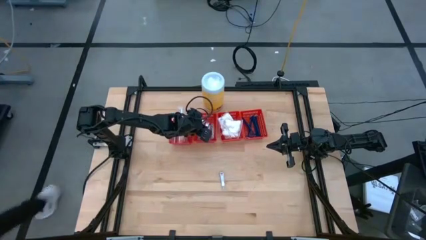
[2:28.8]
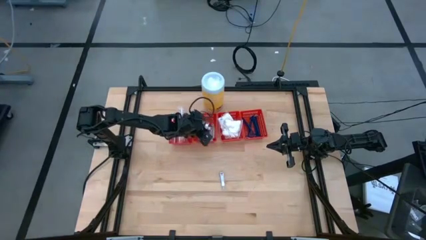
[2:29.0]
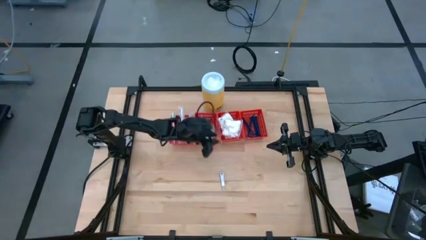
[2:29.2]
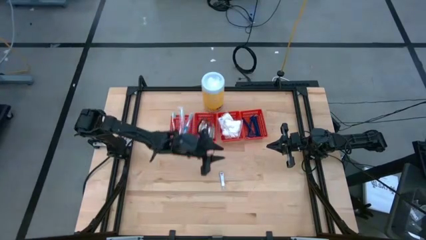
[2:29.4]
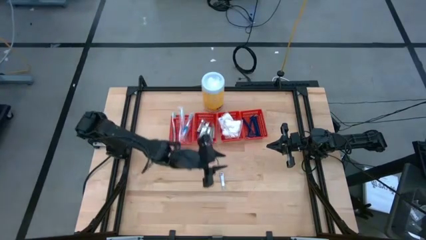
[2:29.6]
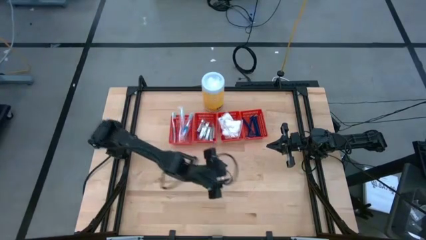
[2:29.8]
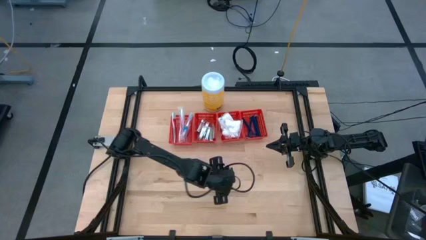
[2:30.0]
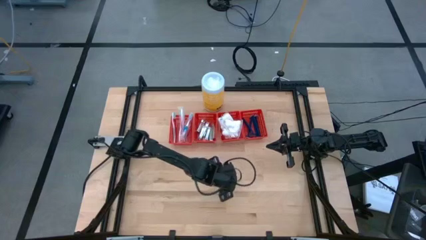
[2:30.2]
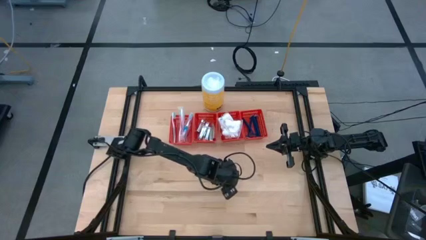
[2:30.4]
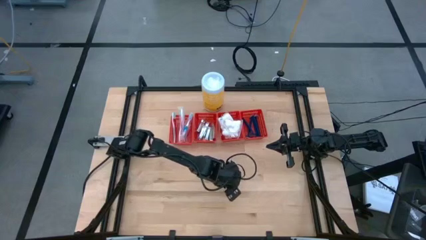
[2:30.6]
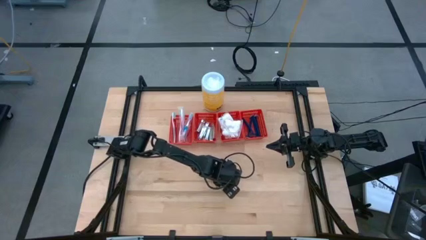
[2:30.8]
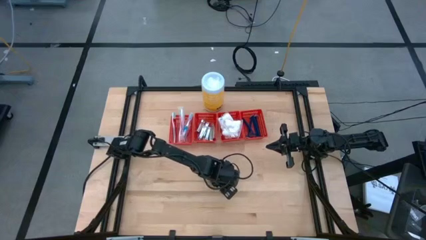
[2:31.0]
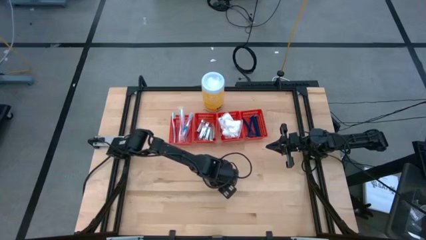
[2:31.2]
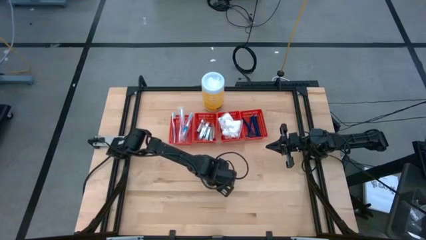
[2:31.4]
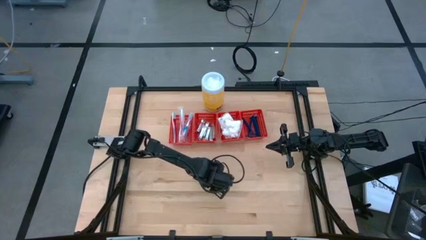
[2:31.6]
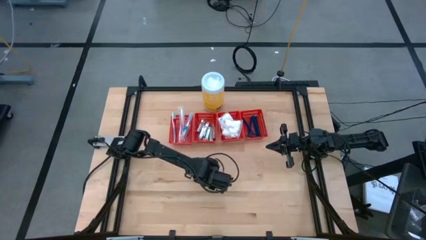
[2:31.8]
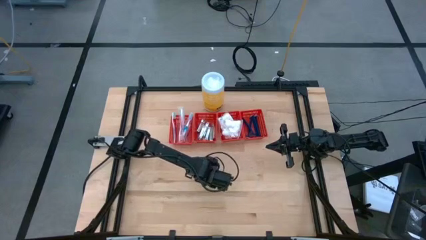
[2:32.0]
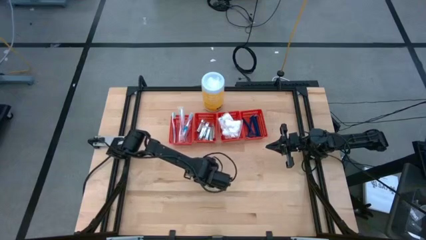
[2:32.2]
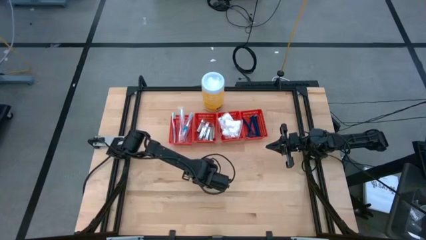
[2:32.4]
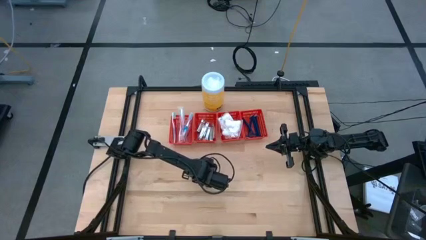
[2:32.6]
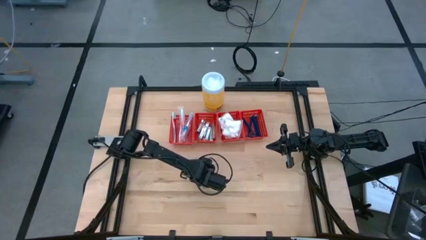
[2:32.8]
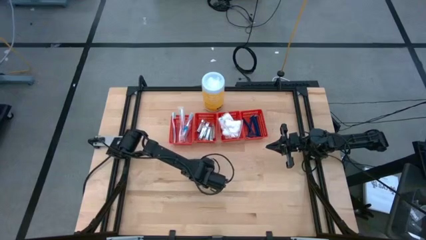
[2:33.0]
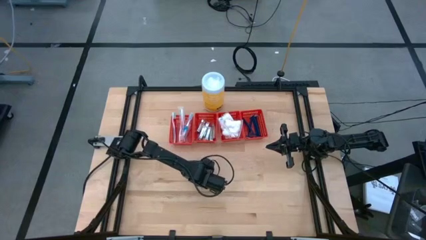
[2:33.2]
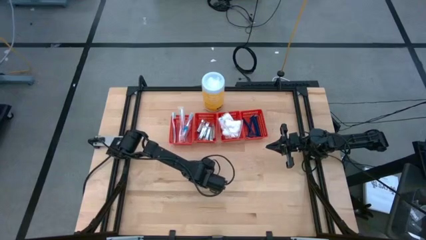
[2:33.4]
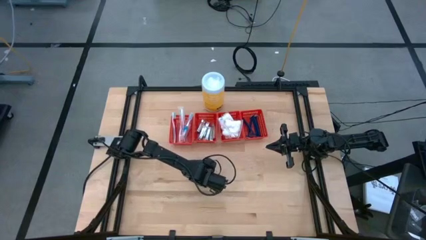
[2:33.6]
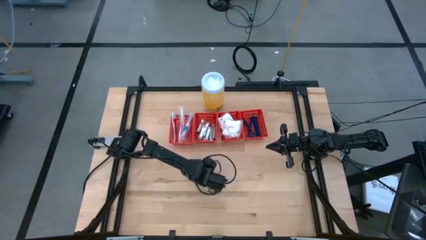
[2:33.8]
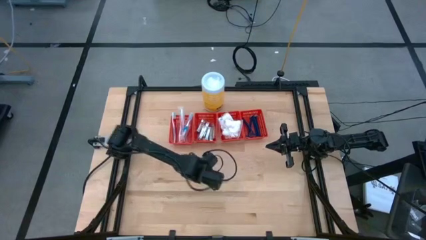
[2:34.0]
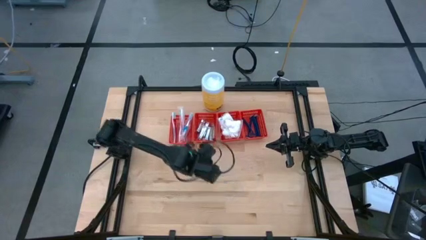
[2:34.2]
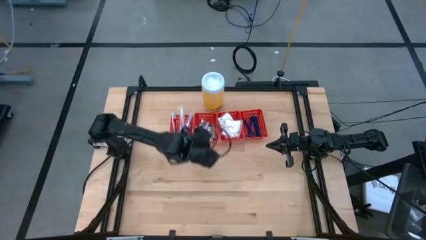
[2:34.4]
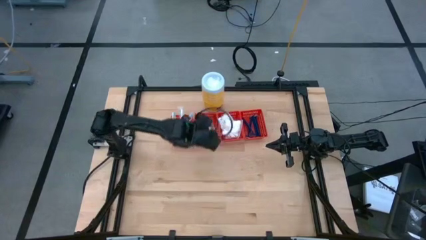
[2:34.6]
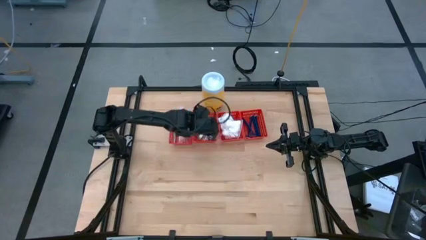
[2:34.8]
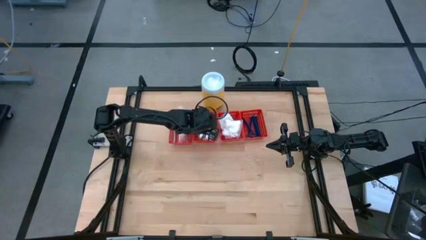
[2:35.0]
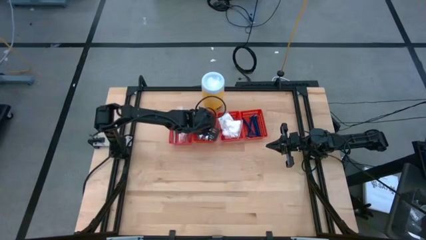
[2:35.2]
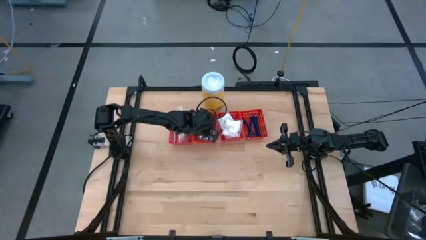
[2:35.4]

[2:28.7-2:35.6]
Task: Pick & Place Travel size toiletries
Put the silver nail clippers into the middle left red basket

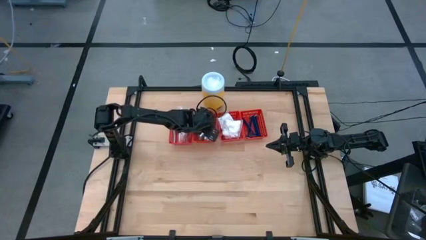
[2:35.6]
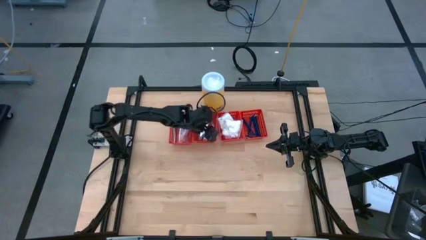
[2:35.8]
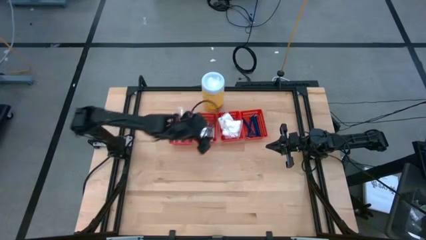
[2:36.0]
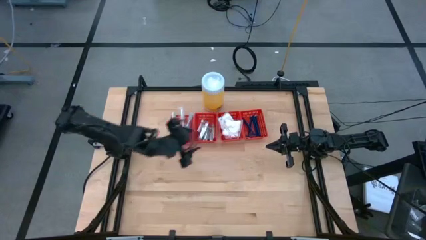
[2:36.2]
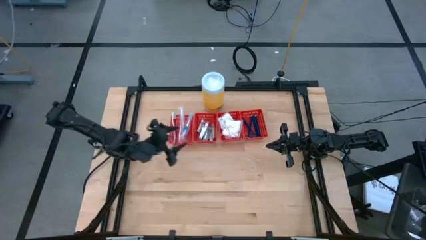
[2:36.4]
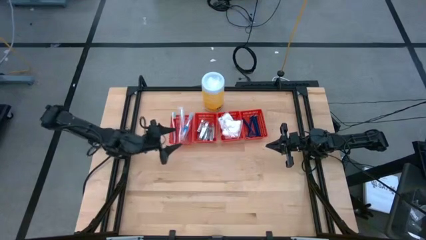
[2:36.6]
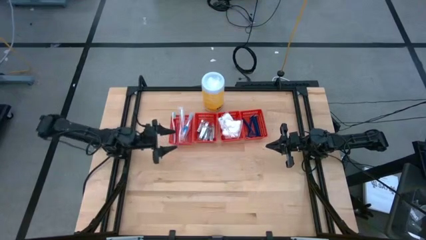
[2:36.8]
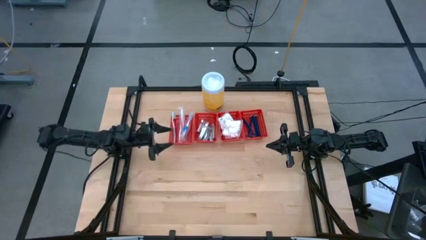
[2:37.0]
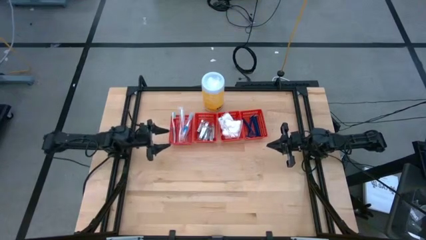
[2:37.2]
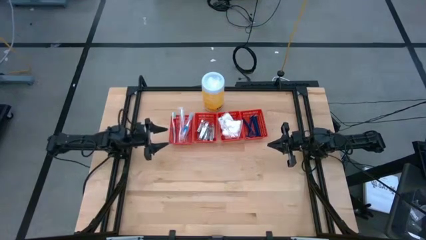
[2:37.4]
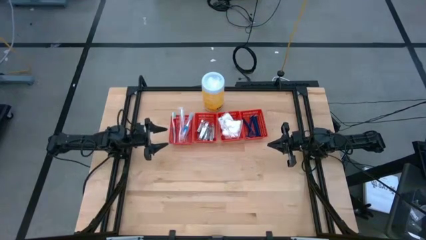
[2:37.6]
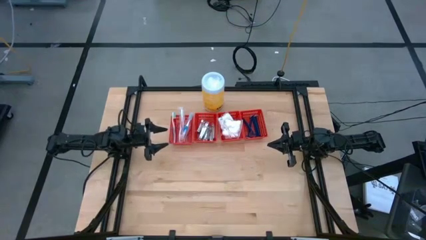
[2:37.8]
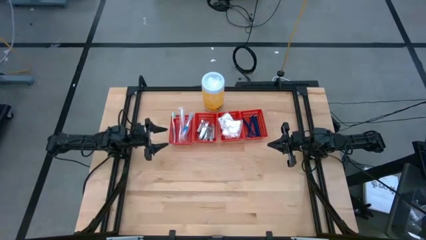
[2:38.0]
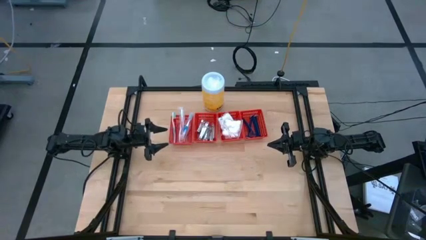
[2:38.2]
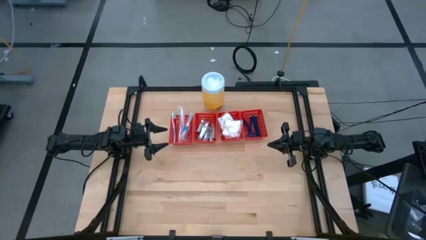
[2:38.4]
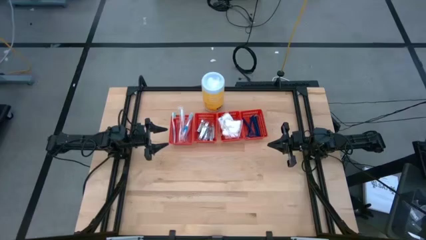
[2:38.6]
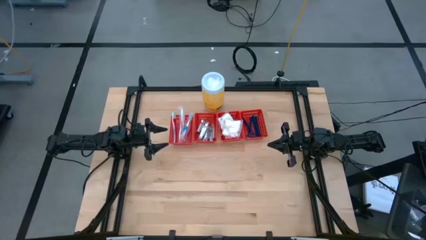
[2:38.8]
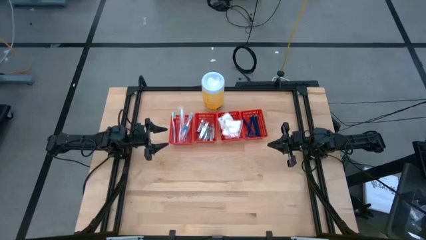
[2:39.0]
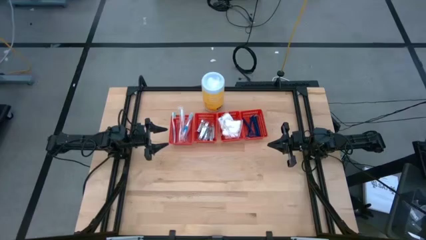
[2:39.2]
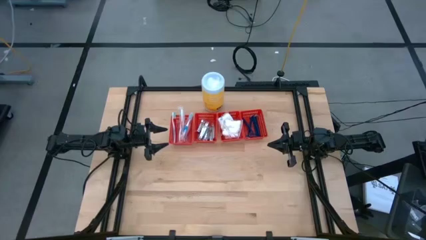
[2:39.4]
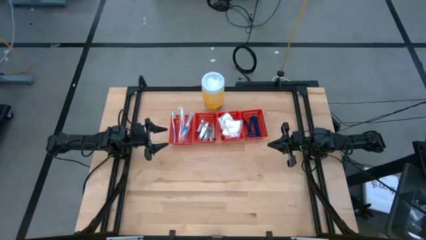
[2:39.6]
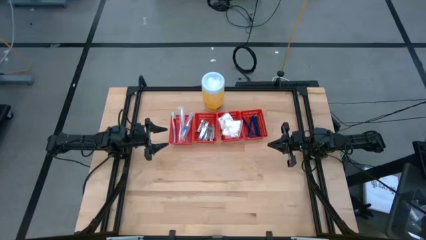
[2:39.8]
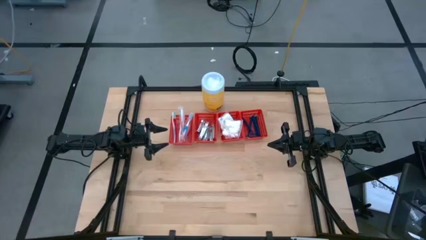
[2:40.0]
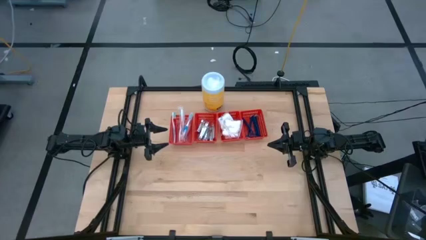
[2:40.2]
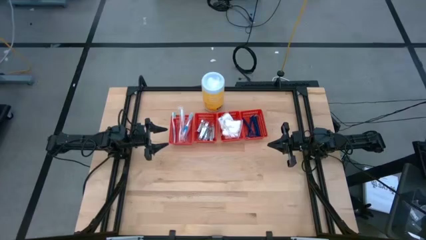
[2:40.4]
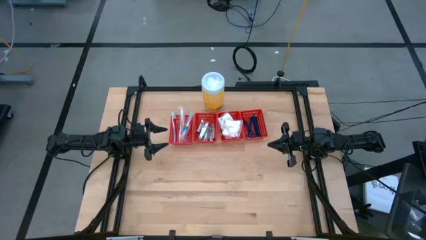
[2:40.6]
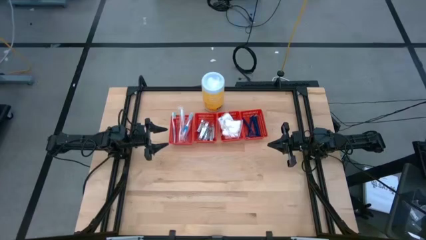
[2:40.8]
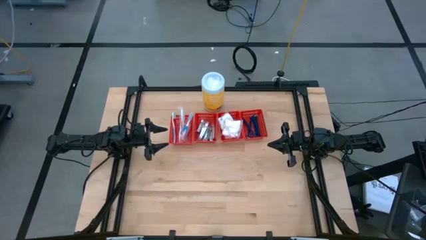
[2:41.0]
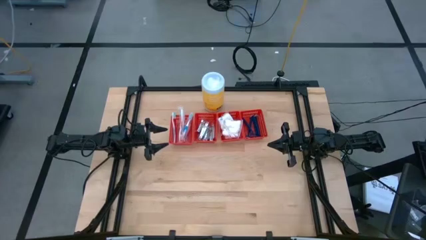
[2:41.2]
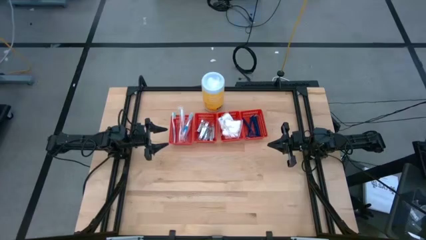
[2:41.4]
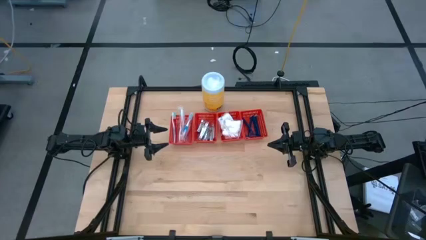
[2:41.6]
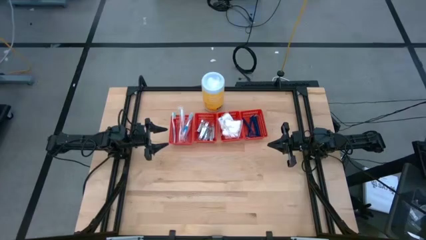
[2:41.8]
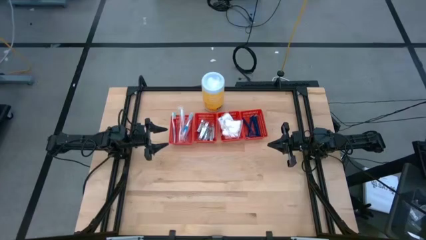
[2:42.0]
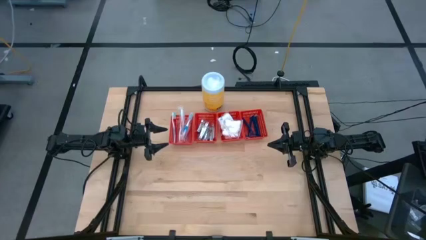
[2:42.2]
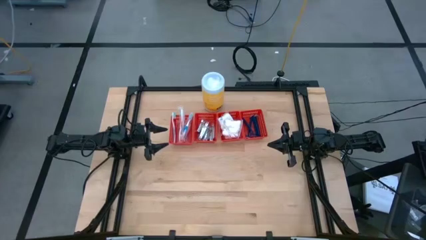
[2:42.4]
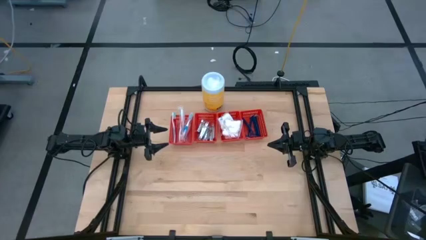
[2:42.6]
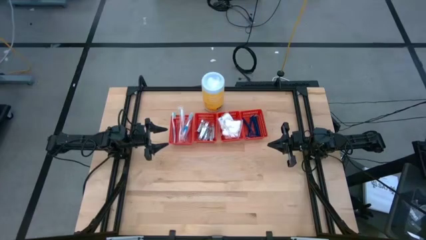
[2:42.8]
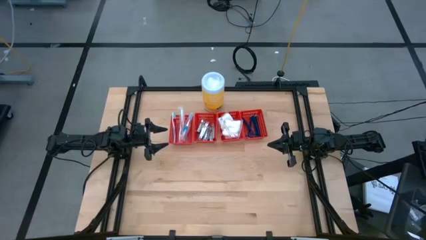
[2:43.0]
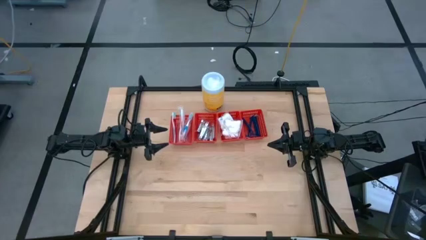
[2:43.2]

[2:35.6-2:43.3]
Return to Home Position
